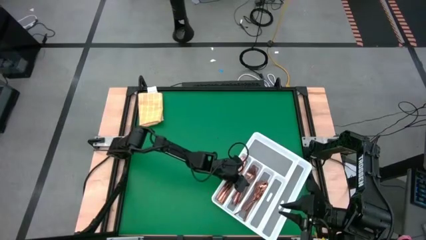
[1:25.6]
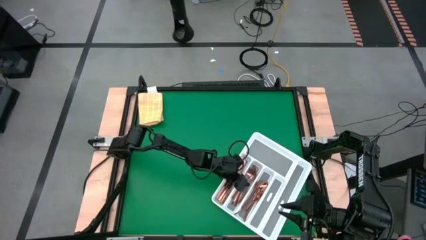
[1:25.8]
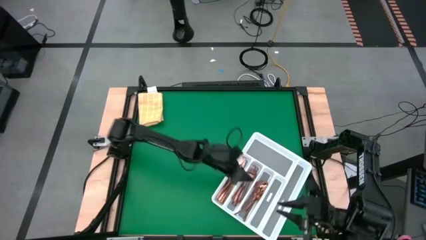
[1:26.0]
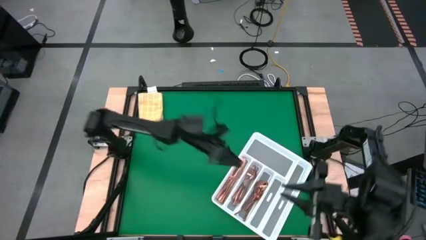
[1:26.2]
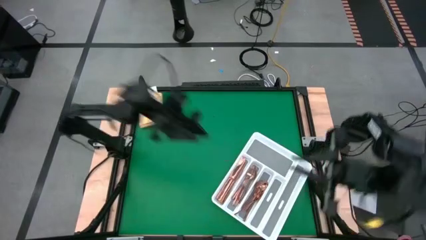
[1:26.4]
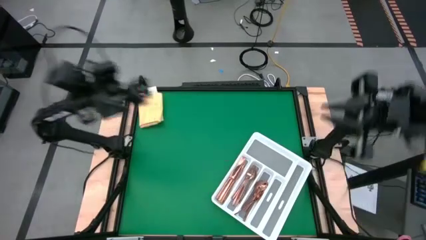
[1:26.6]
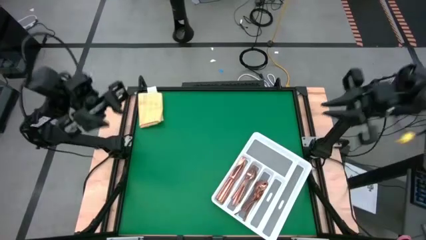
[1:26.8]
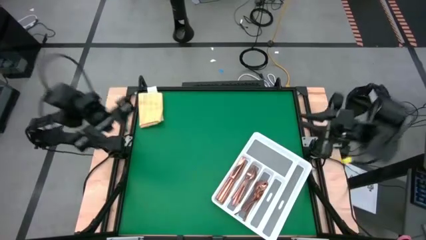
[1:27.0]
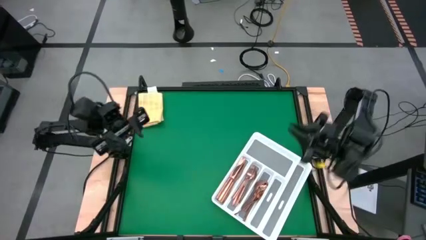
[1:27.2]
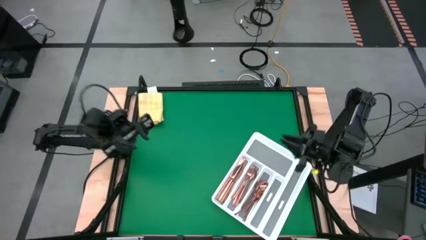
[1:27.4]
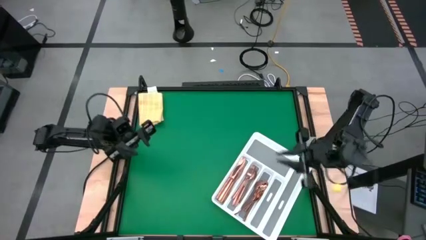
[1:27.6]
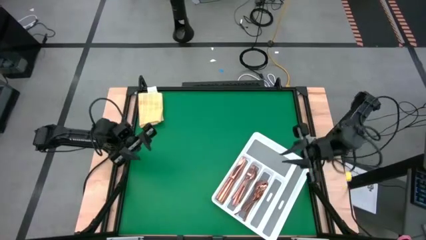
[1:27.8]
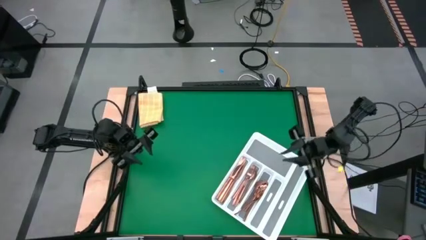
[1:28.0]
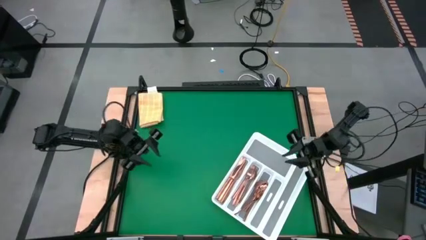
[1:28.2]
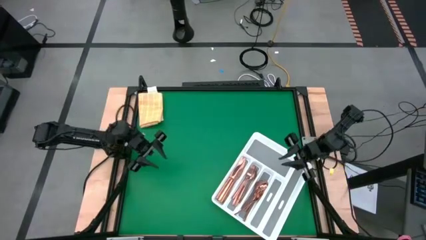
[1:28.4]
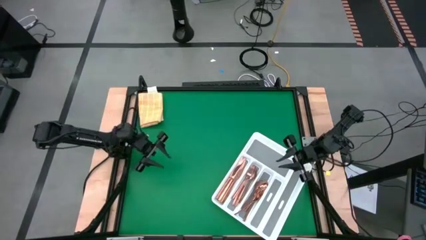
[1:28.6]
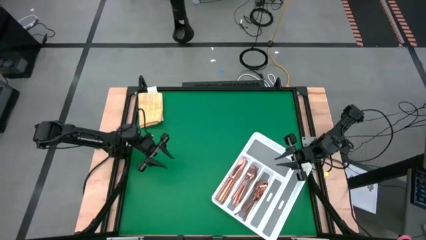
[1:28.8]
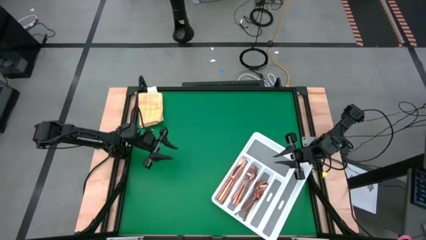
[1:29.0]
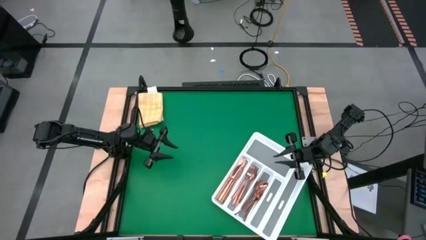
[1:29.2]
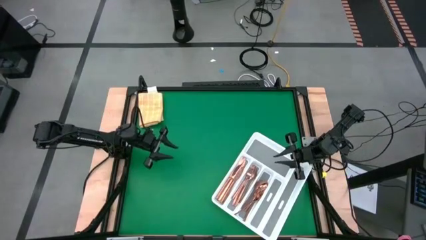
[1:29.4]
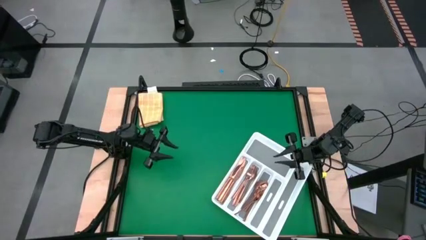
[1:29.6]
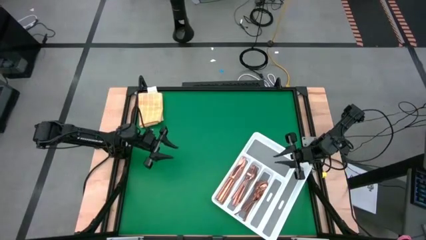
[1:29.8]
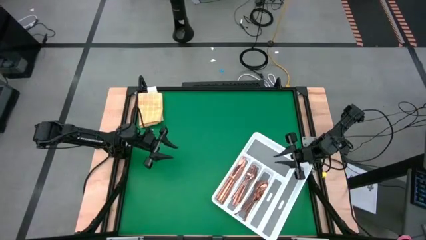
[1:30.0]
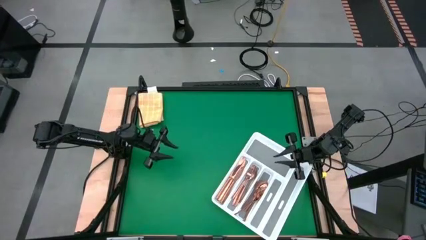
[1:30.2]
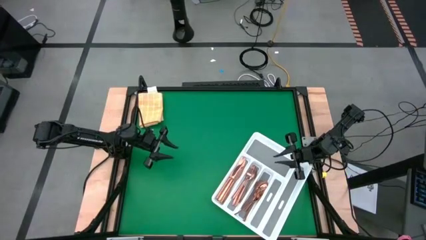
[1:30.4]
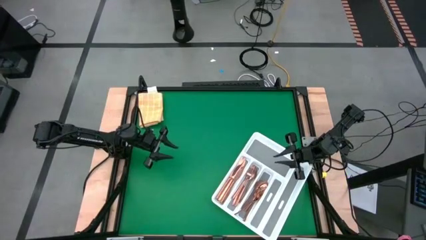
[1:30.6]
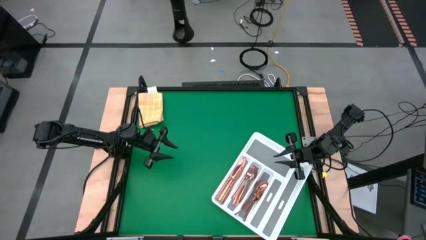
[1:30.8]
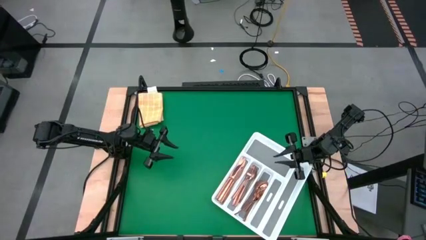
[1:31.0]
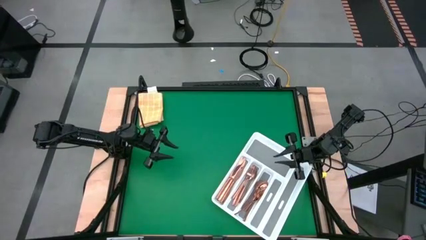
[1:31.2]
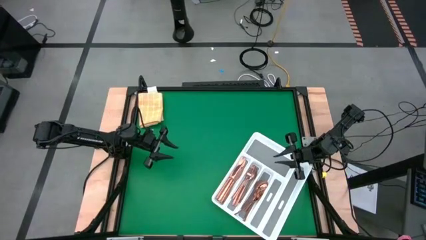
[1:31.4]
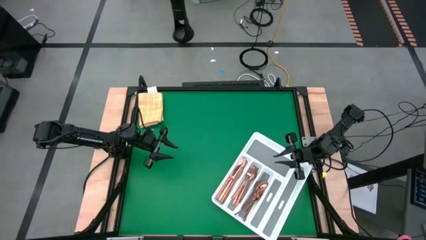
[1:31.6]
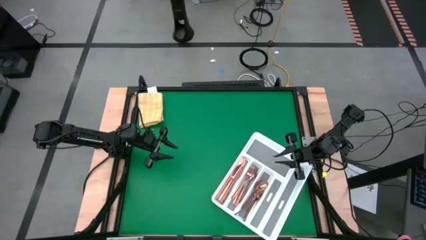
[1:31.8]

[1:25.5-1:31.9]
Task: Sort silverware
Return to Home Position

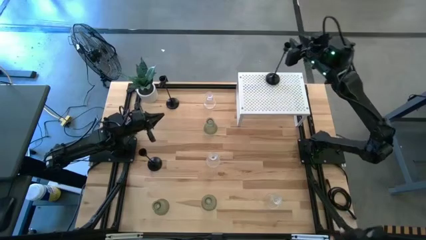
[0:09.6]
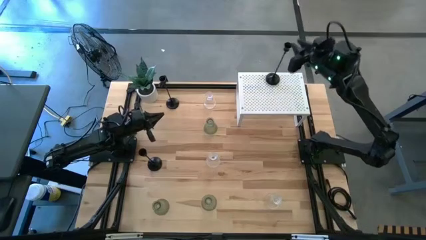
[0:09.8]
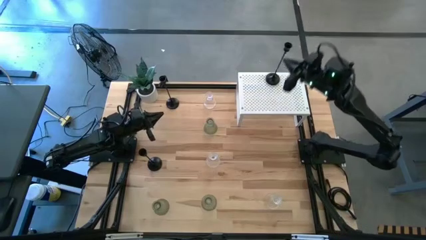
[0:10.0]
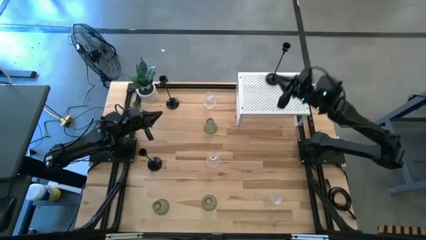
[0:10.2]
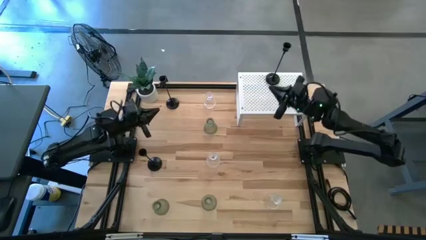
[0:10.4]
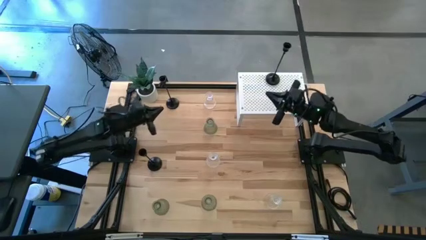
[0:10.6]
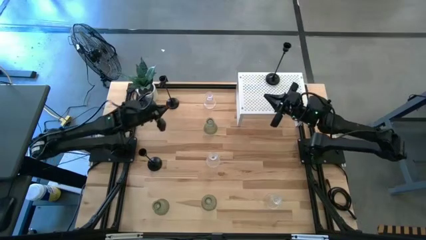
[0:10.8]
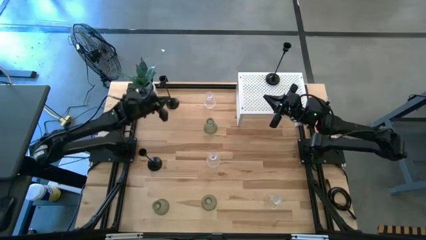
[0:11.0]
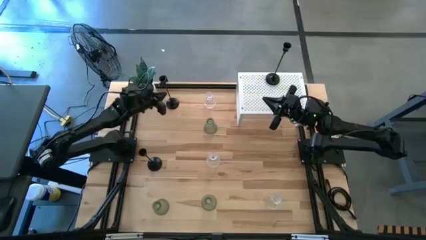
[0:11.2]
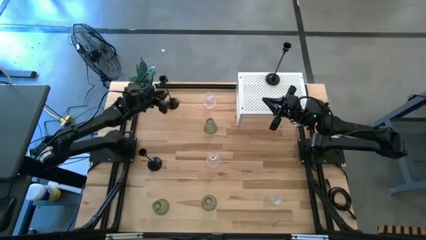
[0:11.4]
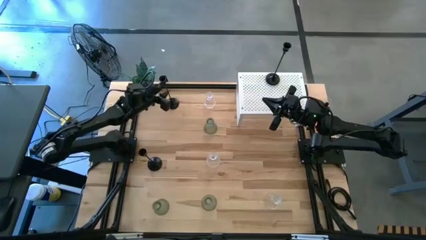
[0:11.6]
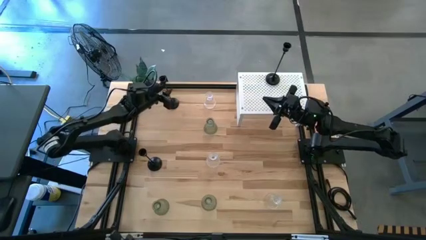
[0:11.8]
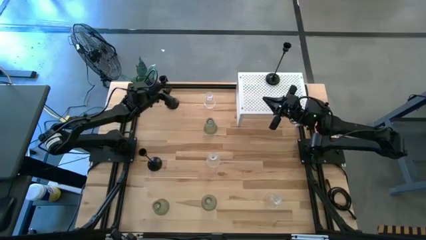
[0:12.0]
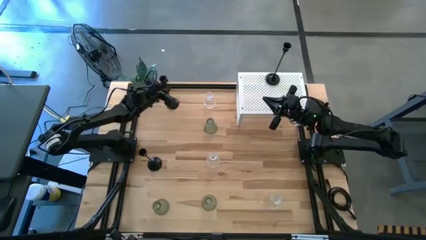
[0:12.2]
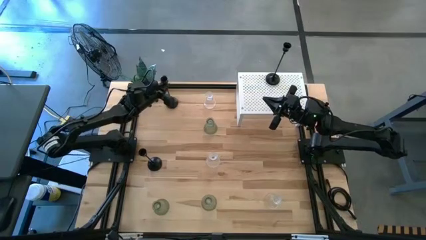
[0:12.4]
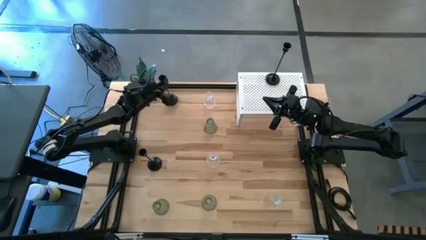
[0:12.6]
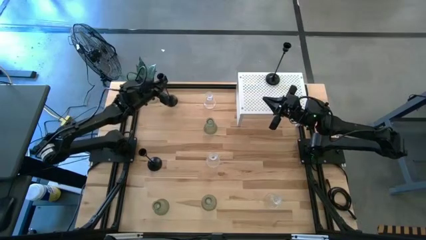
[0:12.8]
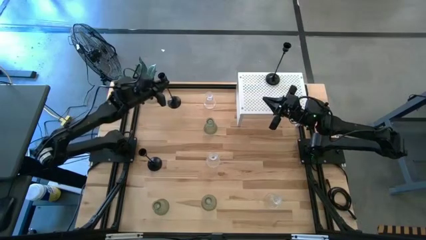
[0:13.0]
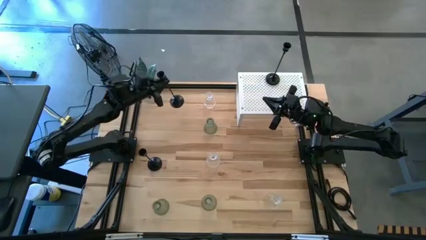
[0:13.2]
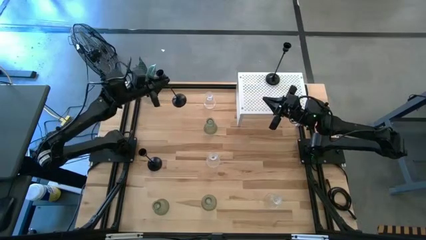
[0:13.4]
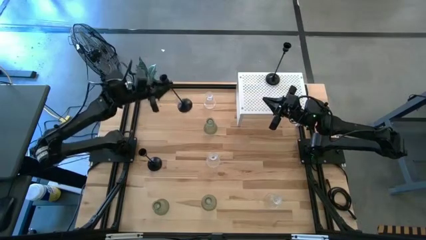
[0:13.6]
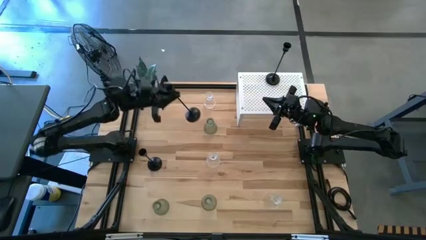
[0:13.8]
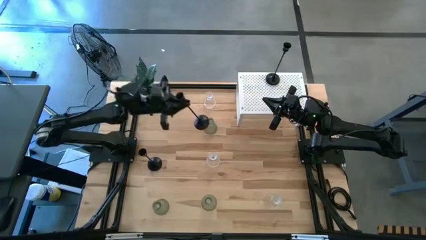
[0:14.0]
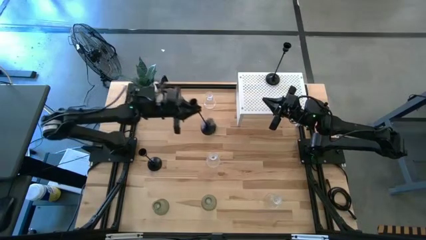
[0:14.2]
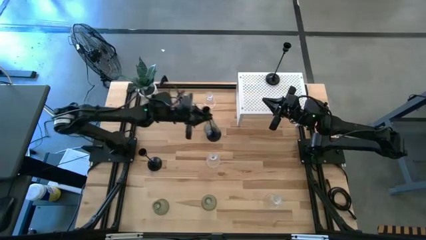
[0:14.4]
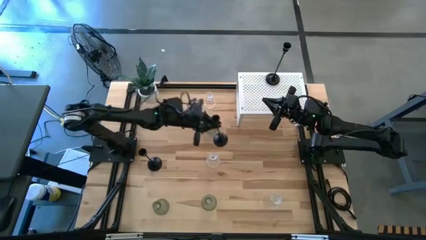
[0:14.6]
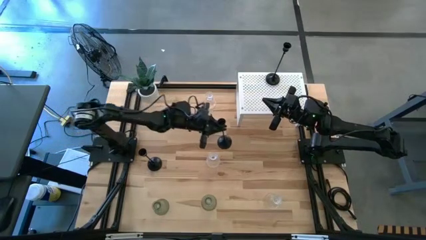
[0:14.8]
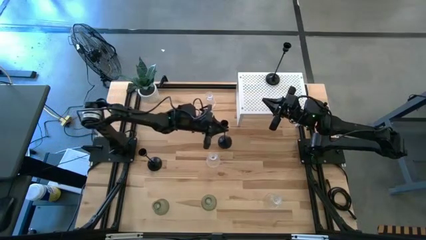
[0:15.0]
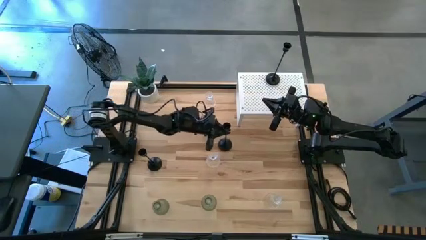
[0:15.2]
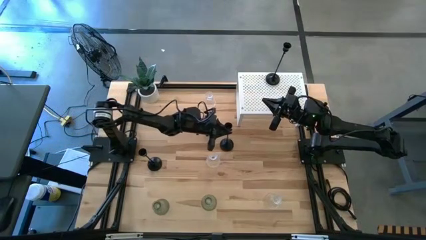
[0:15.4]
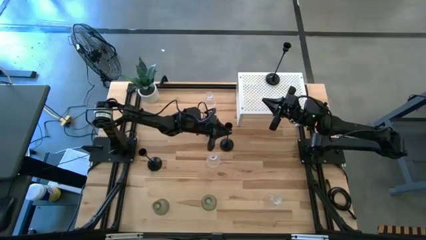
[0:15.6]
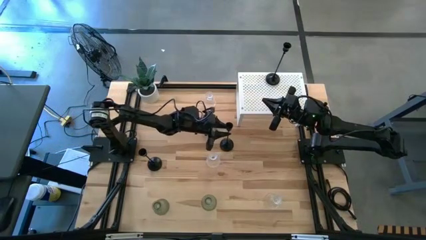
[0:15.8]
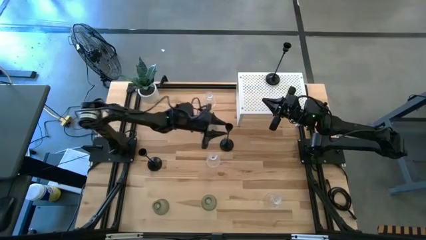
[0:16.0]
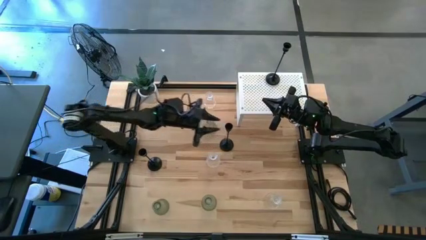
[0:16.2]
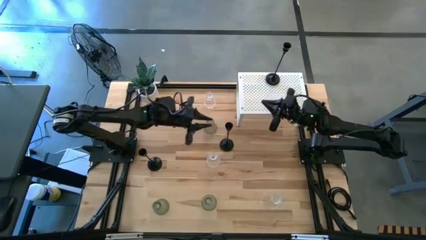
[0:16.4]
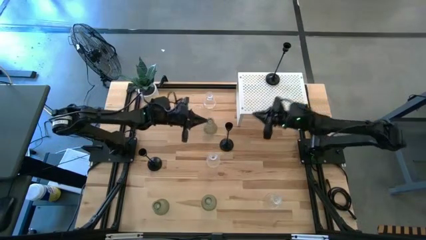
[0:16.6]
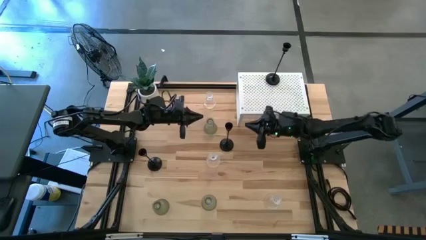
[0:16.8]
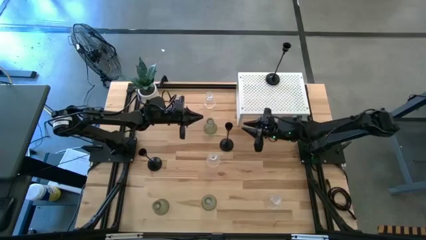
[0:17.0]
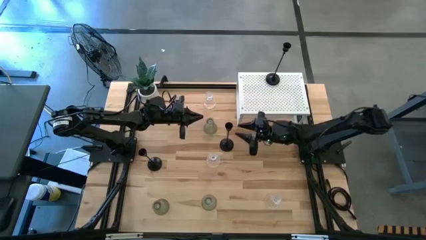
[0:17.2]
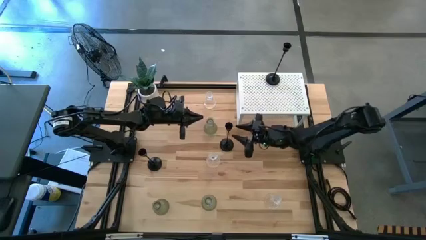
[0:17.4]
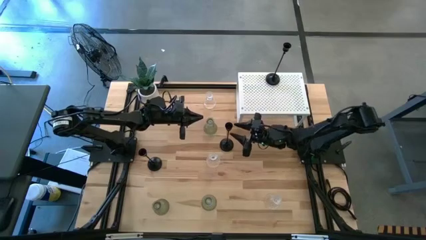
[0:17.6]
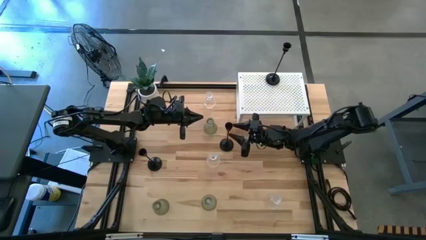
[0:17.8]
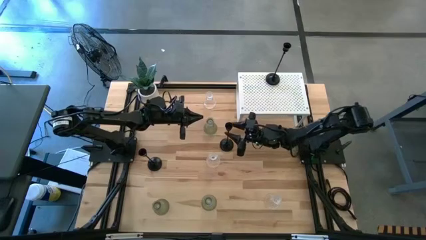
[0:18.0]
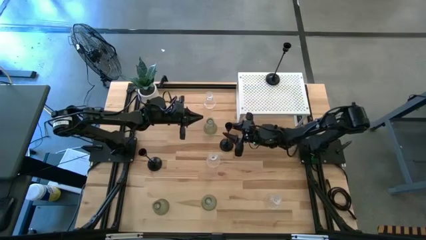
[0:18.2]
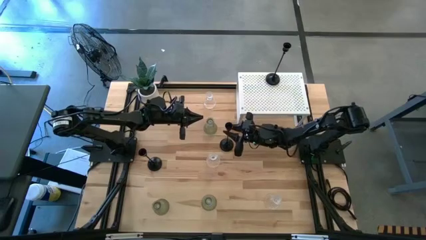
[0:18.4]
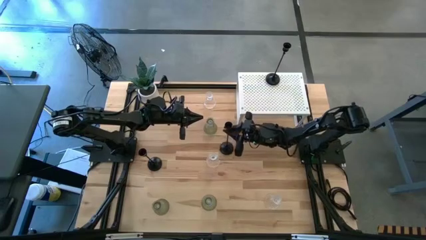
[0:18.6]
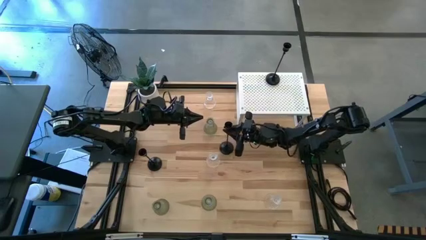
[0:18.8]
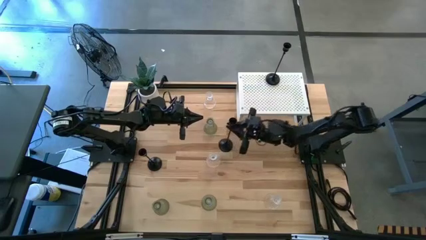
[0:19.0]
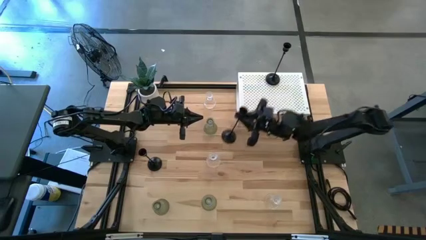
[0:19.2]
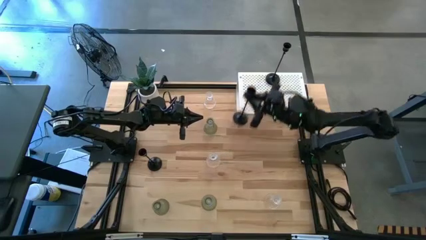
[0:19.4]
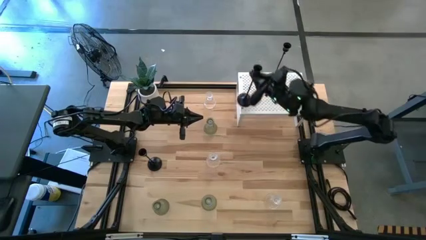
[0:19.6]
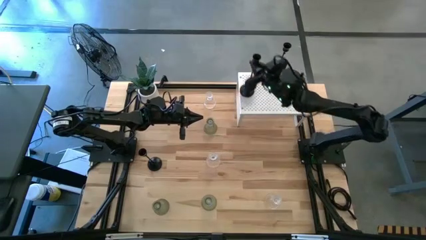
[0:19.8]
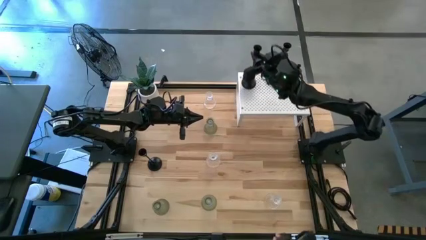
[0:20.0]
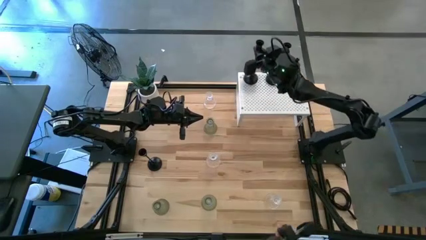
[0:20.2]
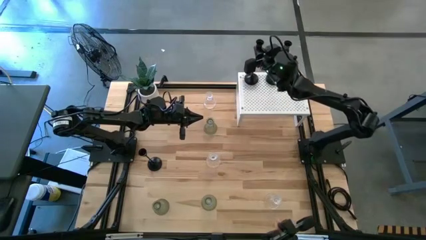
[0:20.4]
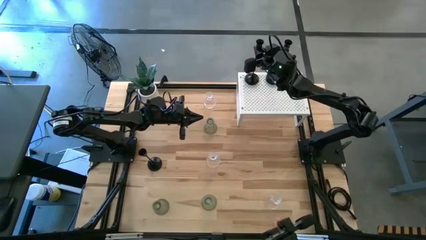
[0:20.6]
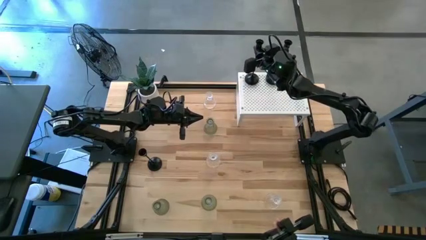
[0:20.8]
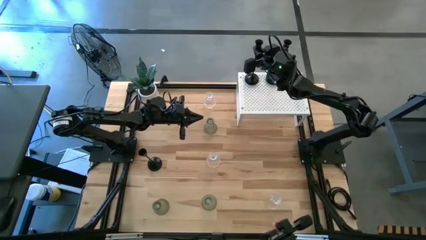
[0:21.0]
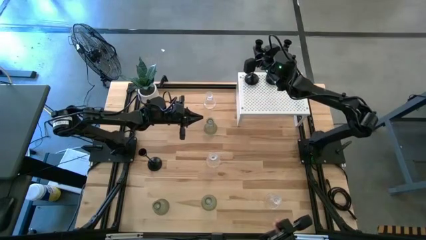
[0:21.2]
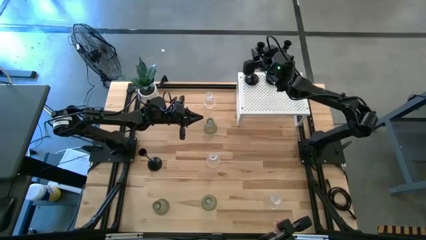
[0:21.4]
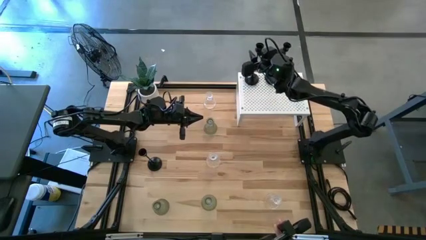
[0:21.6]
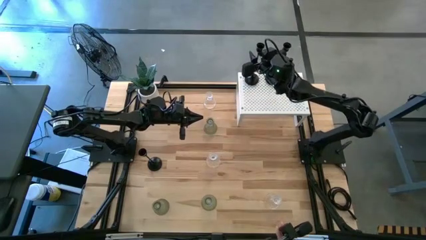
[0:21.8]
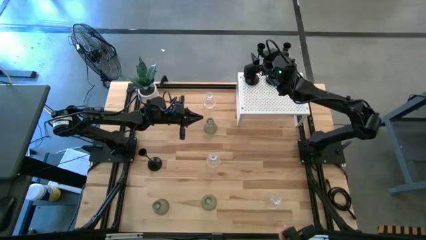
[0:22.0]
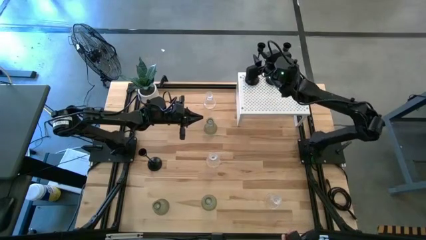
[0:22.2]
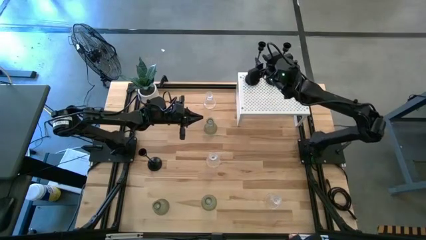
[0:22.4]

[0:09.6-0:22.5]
Task: Pick & Place candle stick holders
Put the top black candle holder on the shelf aligned with the other black candle holder
